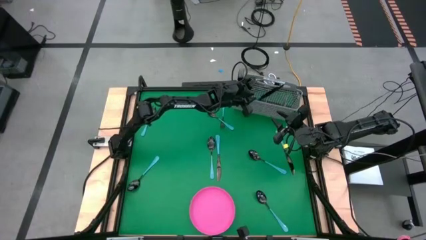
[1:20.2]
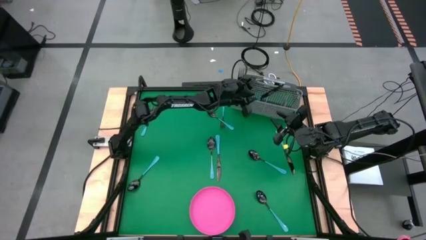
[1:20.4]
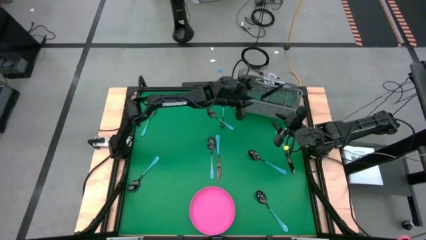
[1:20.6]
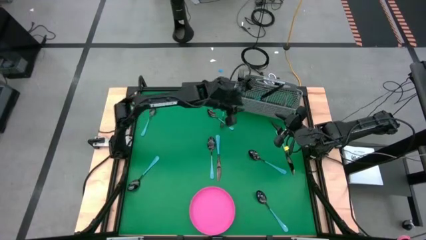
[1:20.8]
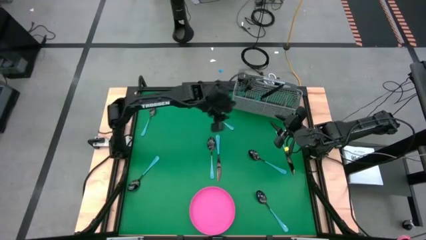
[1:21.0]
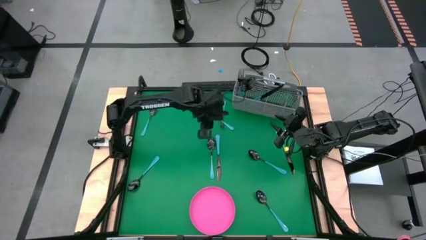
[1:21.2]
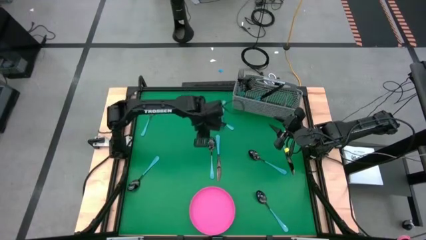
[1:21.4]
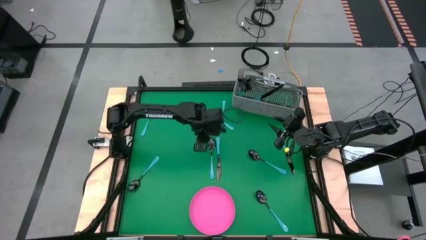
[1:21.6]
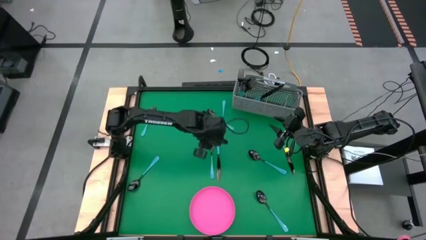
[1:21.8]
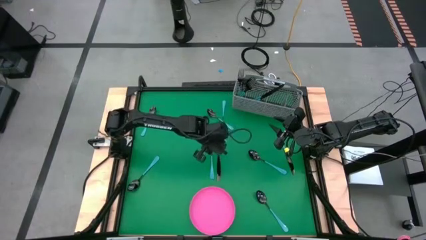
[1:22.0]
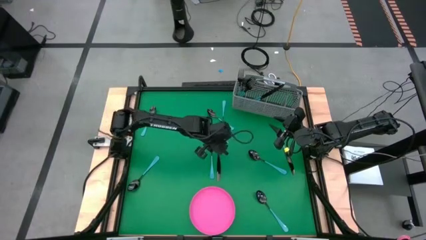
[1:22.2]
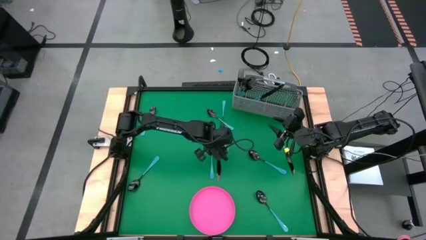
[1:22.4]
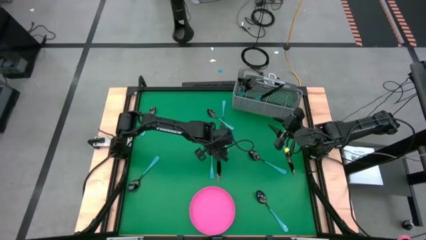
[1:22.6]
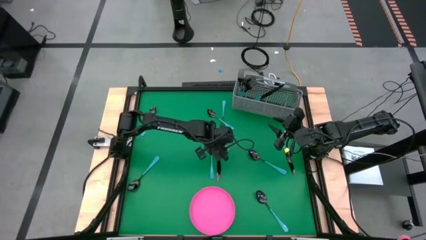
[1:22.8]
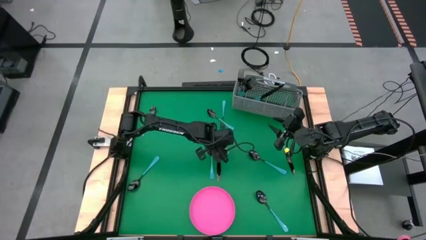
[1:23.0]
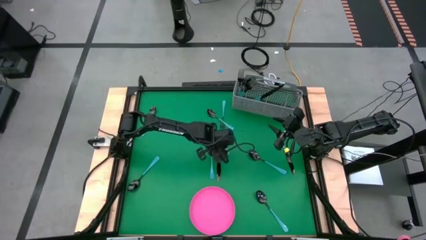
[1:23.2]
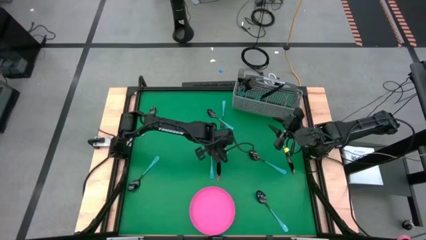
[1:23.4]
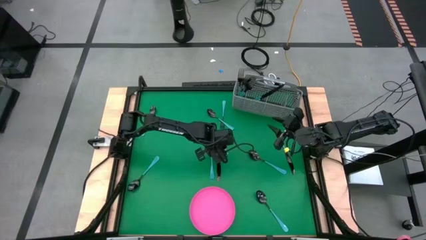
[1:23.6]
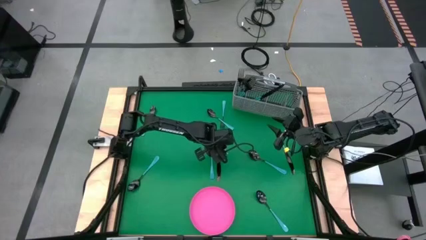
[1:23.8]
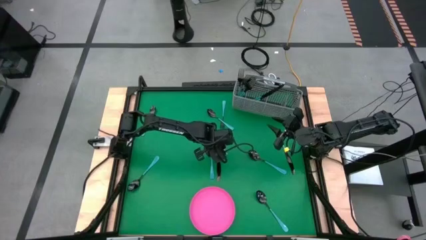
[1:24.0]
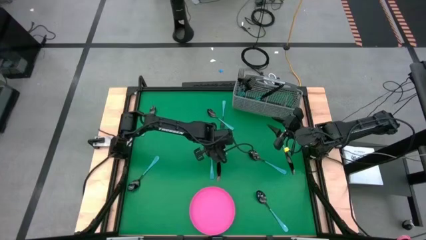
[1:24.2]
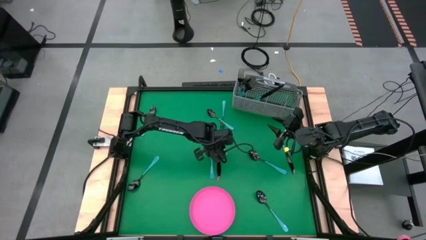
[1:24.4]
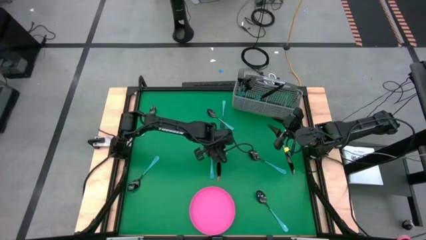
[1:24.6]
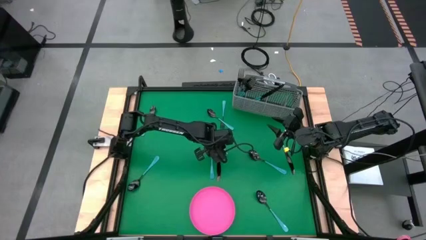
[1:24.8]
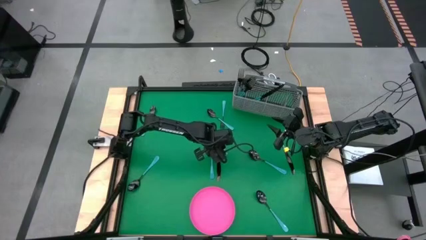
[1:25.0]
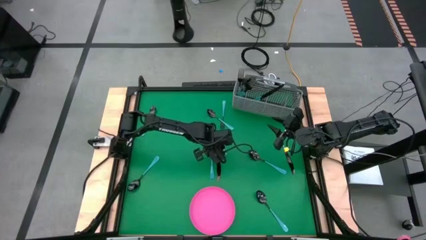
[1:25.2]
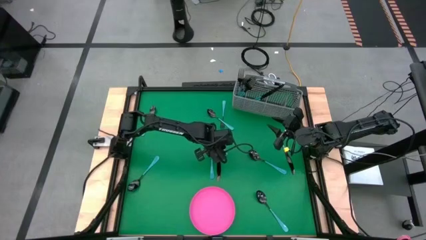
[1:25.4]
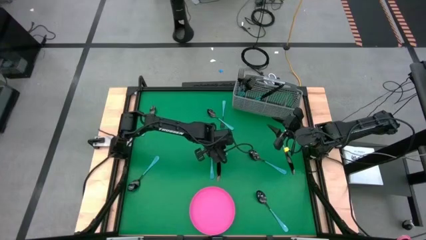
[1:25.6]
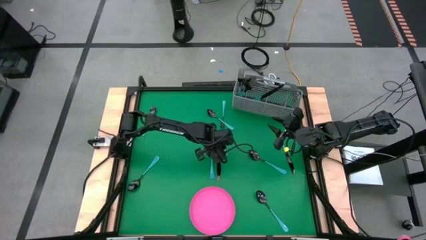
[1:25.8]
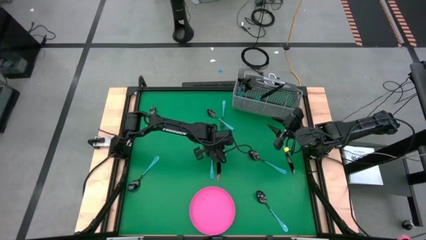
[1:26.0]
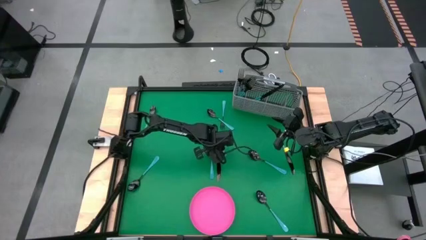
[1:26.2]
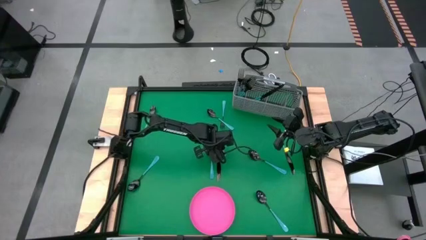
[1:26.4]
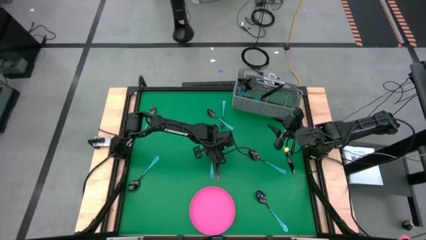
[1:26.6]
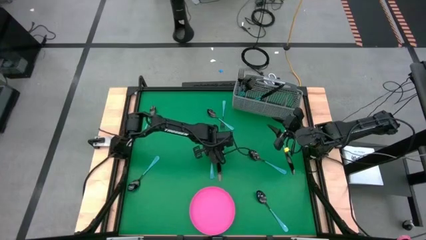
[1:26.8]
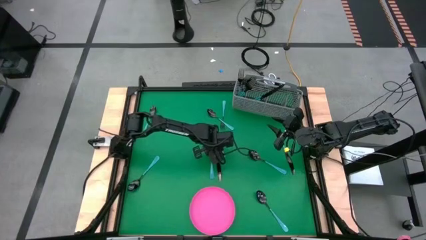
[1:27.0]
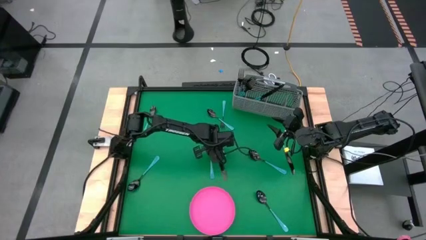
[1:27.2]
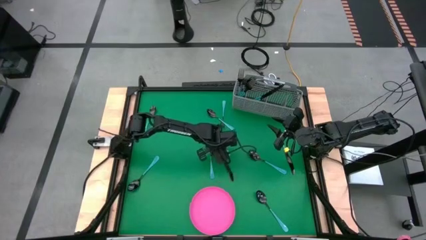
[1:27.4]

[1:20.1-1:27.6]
Task: Sort silverware
Put the blue knife into the utensil holder

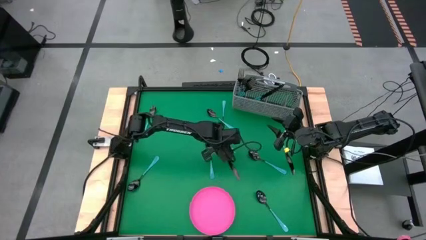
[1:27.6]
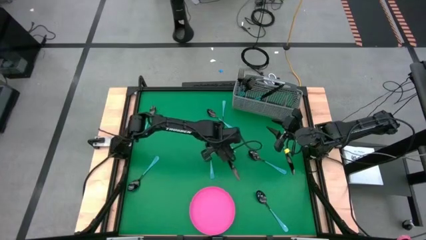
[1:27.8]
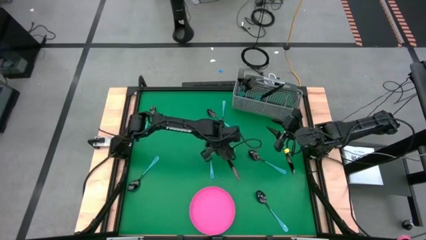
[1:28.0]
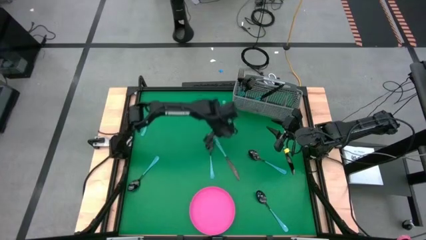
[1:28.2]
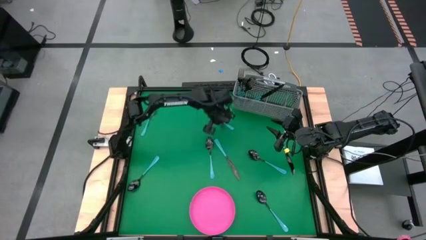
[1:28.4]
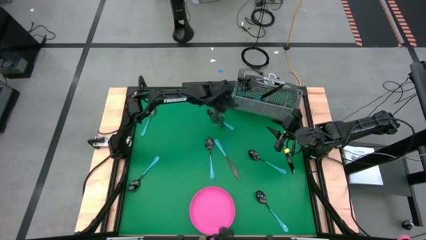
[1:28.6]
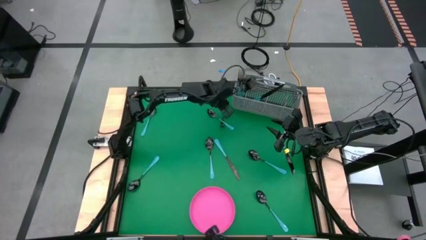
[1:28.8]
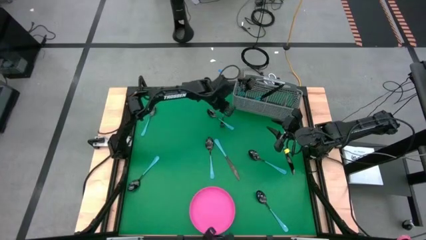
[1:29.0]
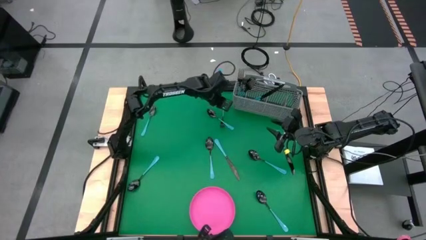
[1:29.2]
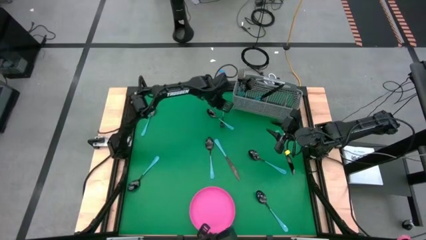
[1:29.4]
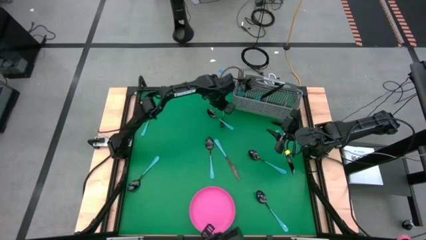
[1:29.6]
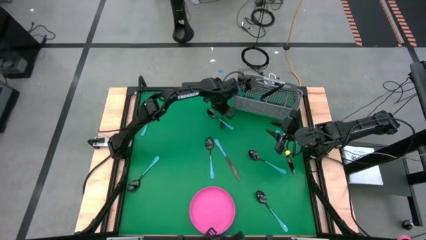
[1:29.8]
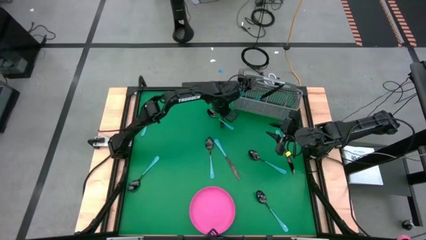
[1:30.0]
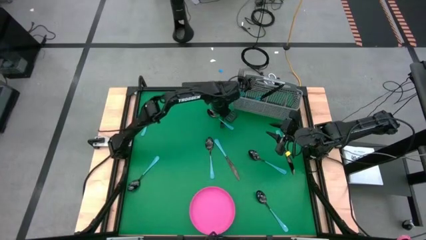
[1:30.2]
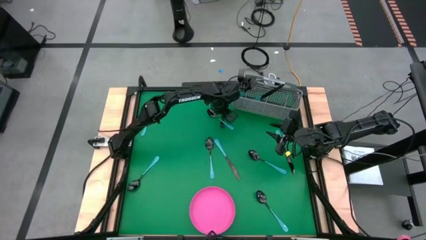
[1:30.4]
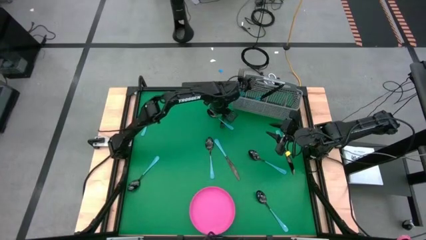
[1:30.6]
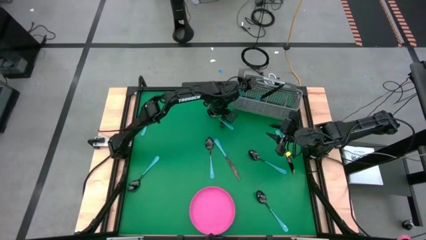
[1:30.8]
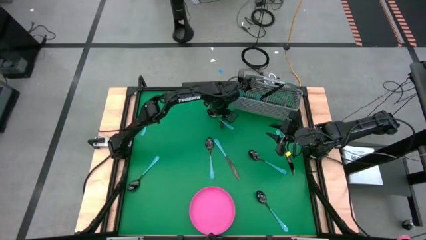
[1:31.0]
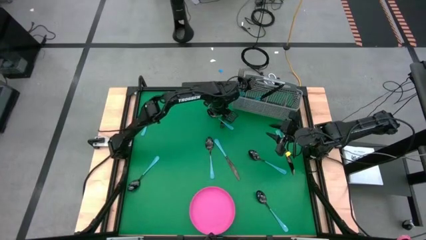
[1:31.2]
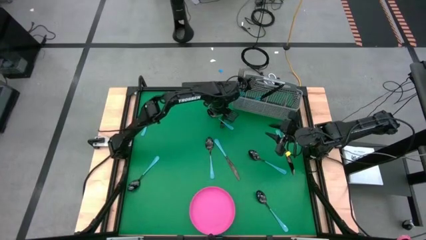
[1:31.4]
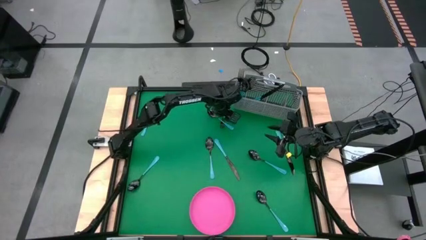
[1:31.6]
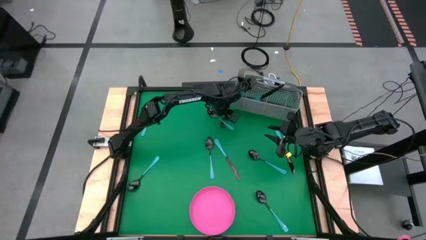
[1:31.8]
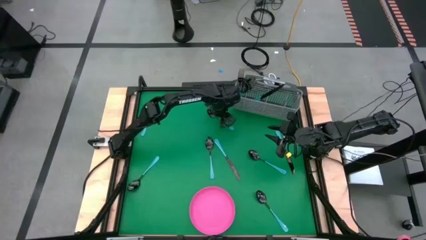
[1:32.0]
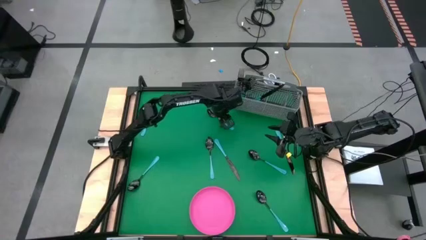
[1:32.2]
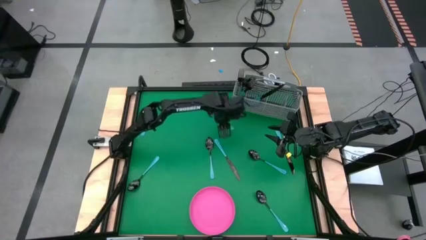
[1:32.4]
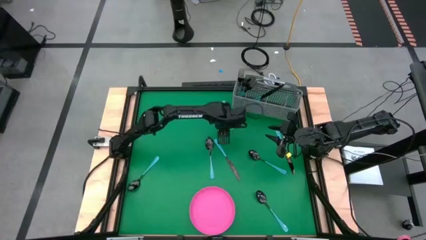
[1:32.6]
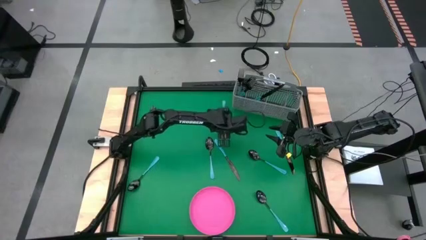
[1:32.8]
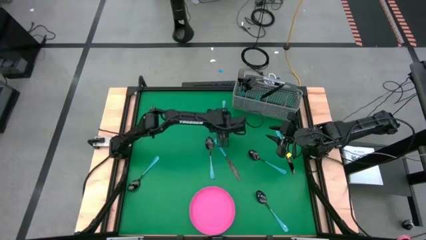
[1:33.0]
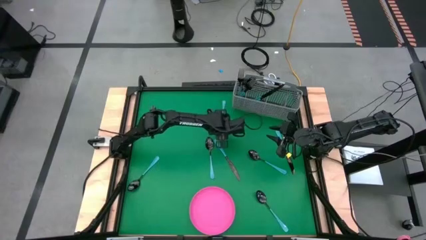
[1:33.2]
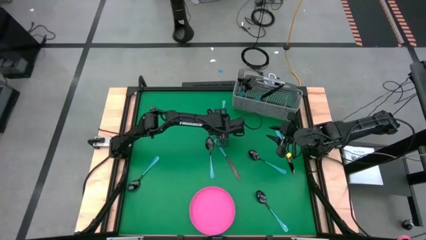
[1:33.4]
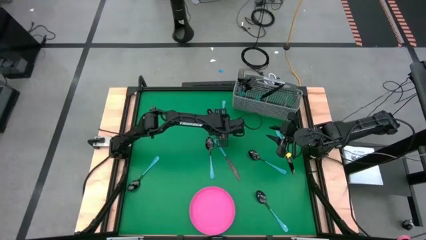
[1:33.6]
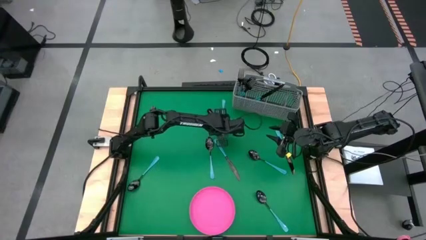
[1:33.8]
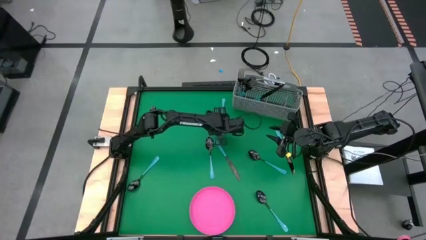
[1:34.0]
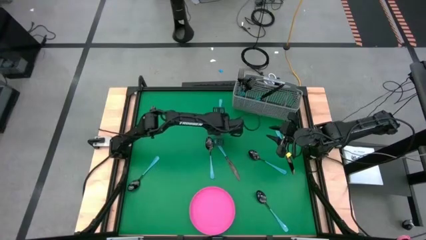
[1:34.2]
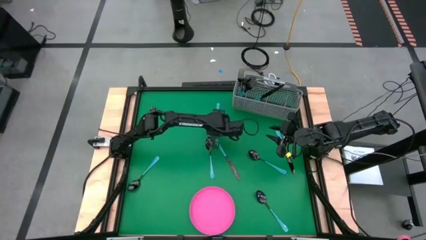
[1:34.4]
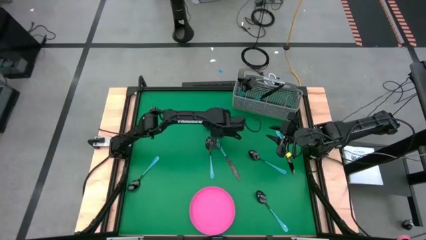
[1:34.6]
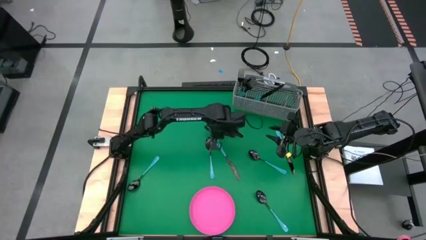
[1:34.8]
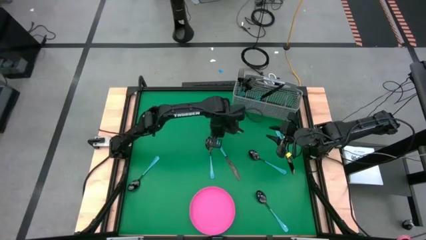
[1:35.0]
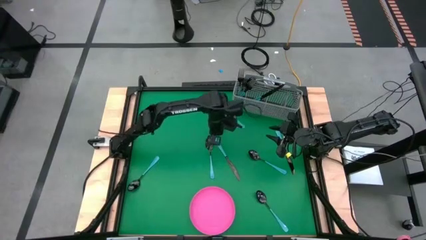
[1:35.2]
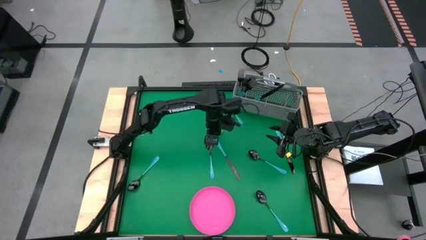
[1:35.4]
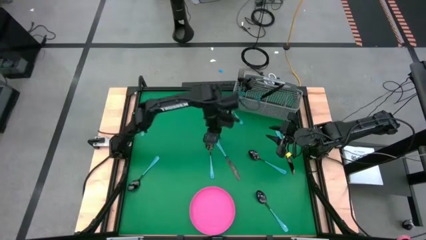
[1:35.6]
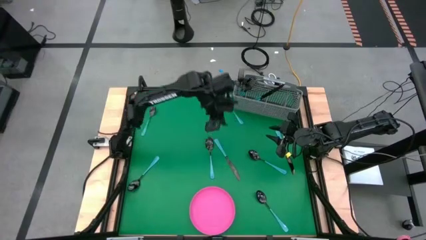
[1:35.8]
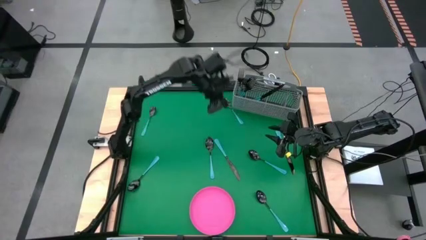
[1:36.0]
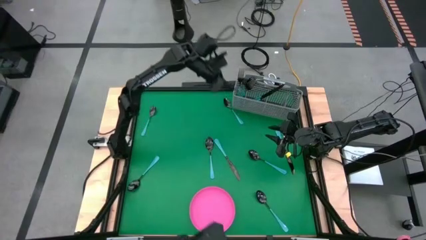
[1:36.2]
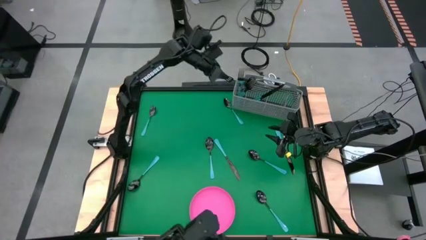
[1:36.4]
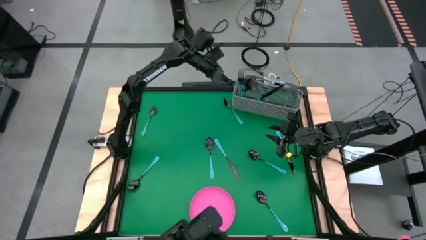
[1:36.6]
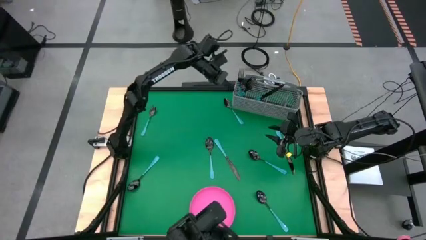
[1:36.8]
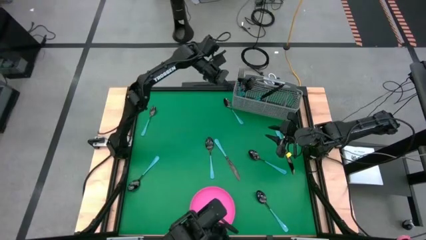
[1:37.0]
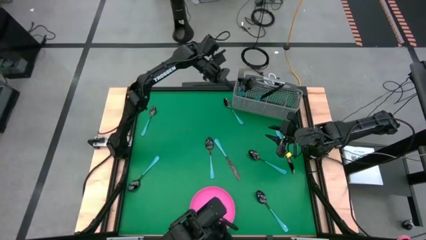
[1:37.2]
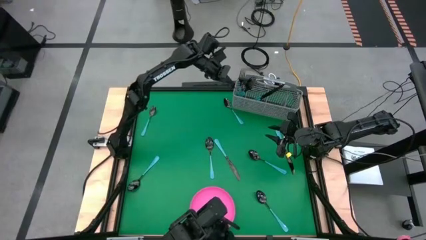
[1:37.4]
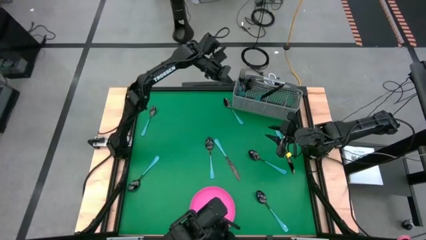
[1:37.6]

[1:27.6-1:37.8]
Put the blue fork into the utensil holder
